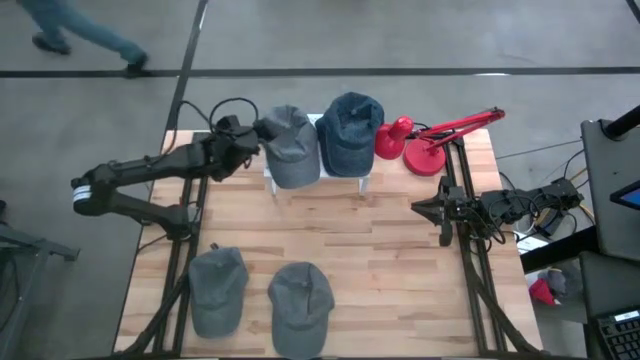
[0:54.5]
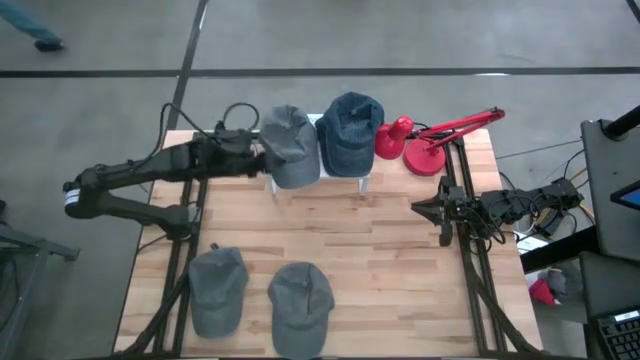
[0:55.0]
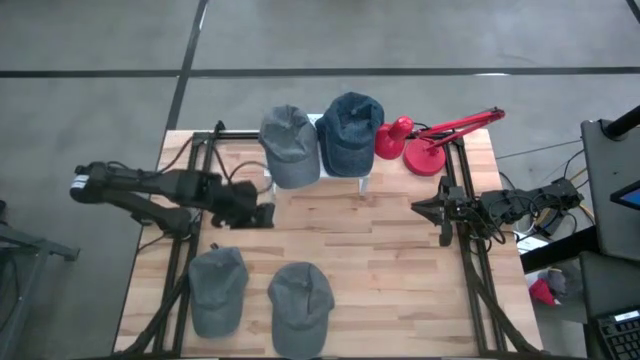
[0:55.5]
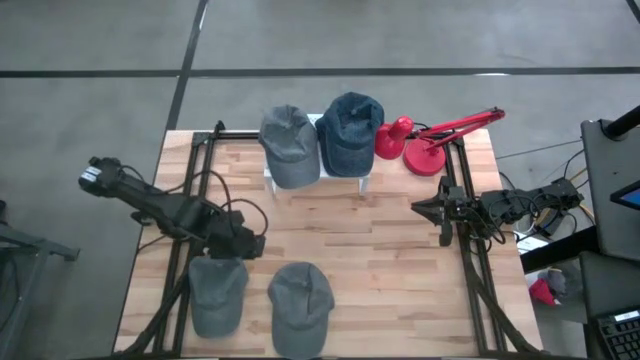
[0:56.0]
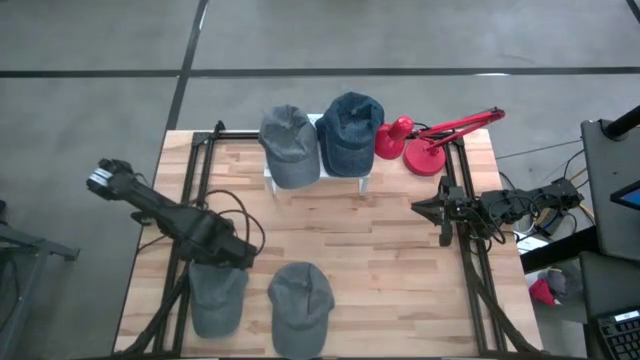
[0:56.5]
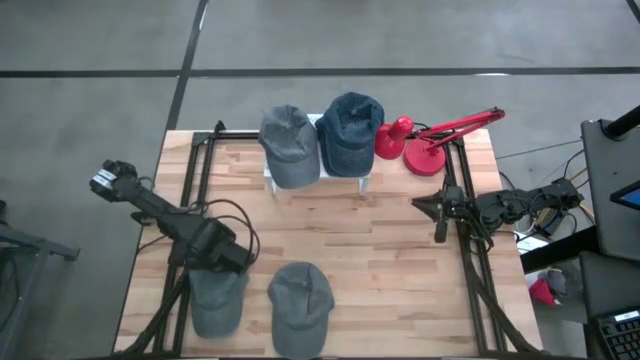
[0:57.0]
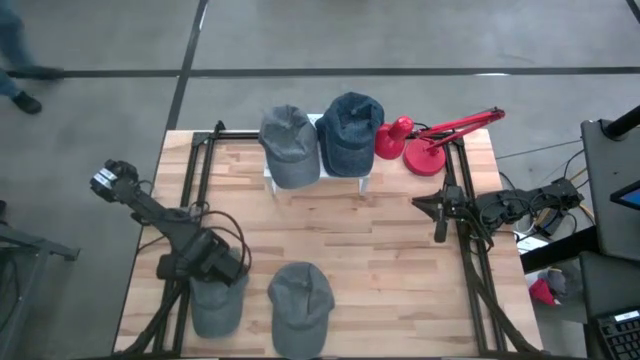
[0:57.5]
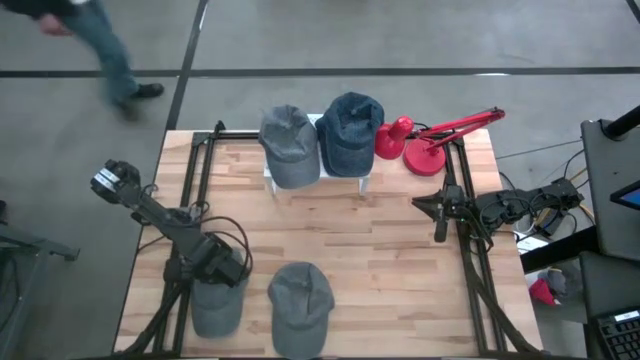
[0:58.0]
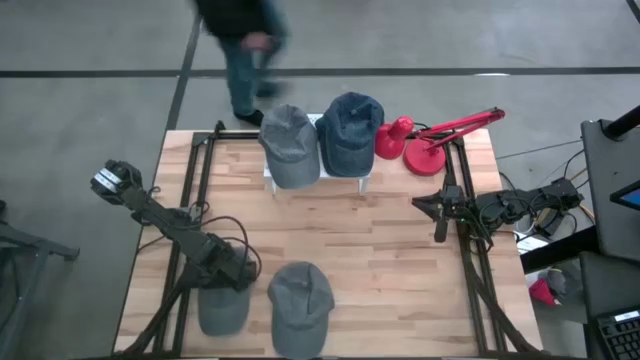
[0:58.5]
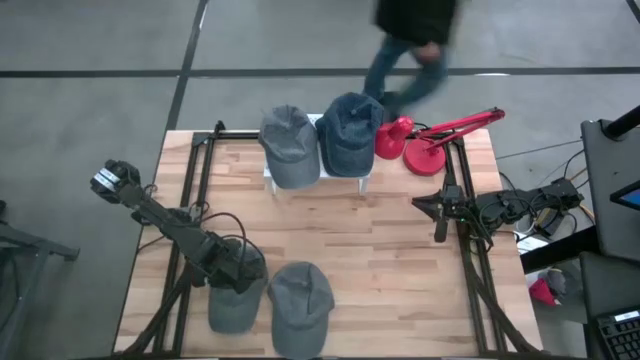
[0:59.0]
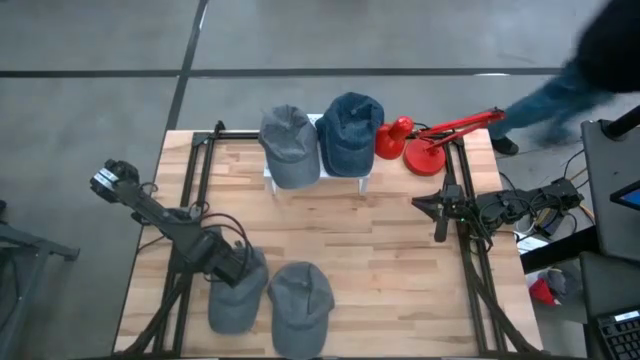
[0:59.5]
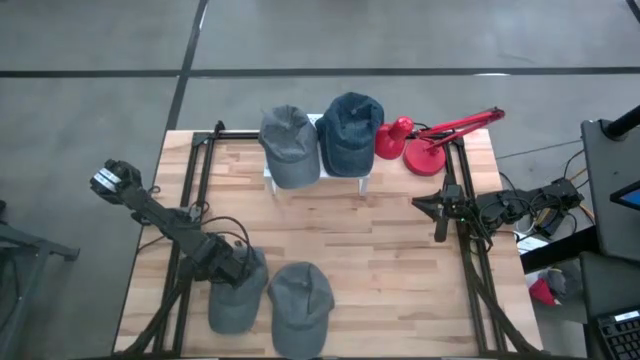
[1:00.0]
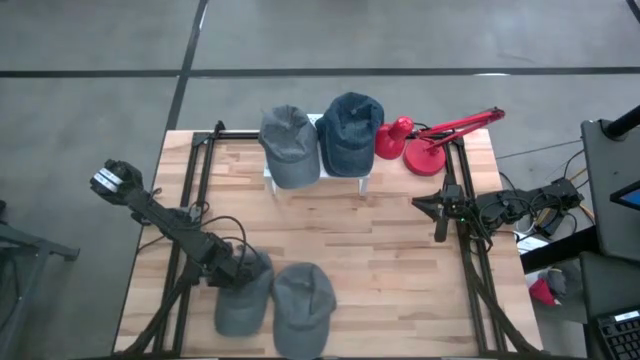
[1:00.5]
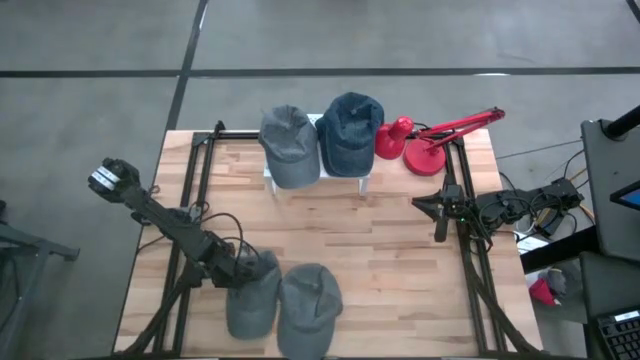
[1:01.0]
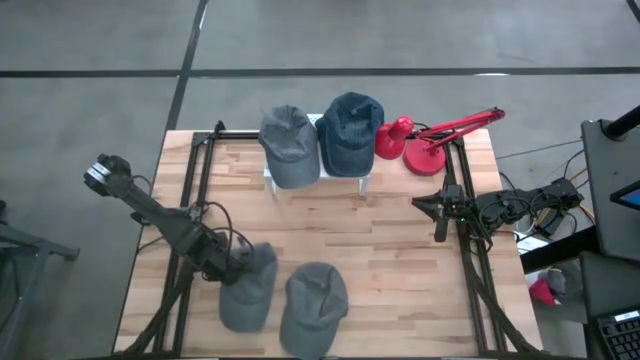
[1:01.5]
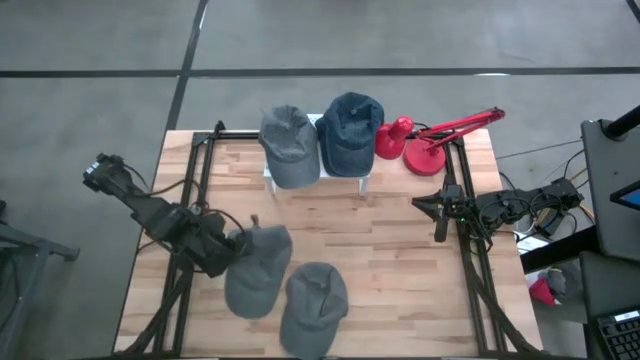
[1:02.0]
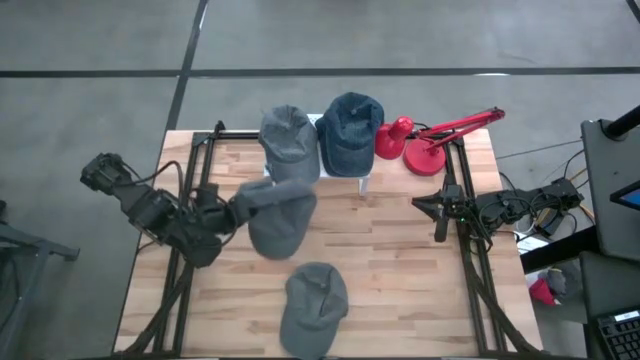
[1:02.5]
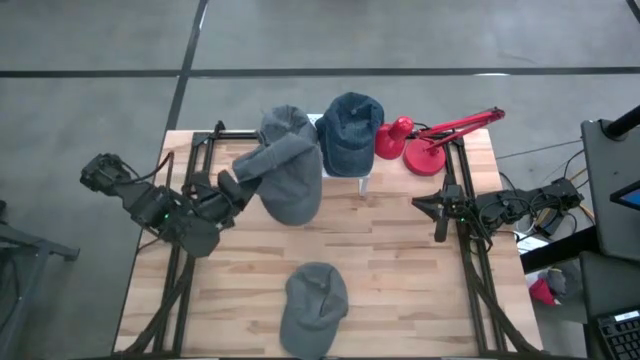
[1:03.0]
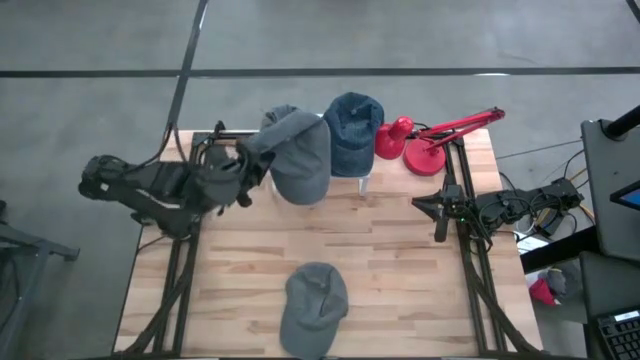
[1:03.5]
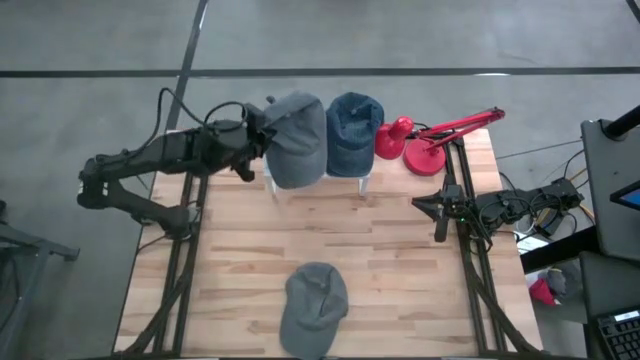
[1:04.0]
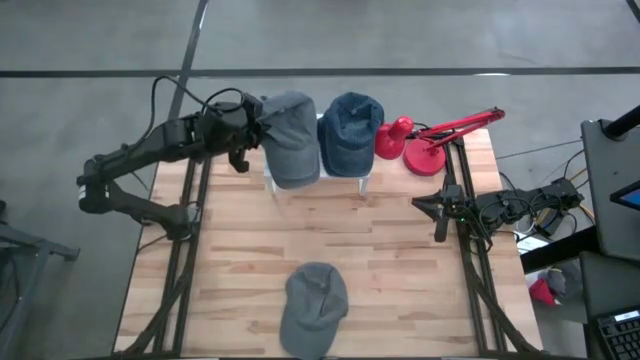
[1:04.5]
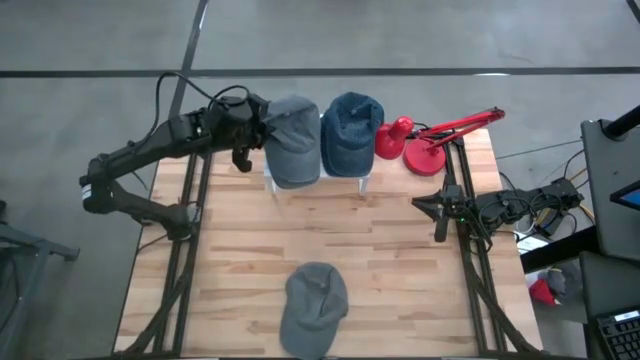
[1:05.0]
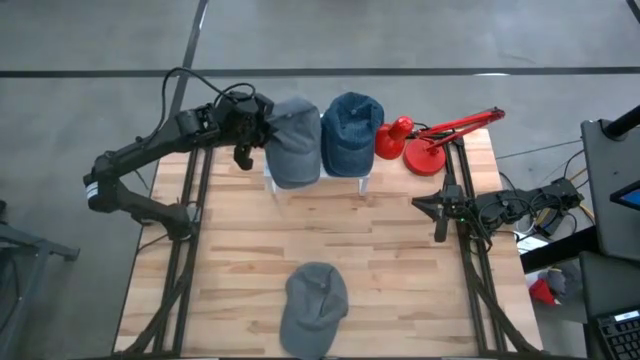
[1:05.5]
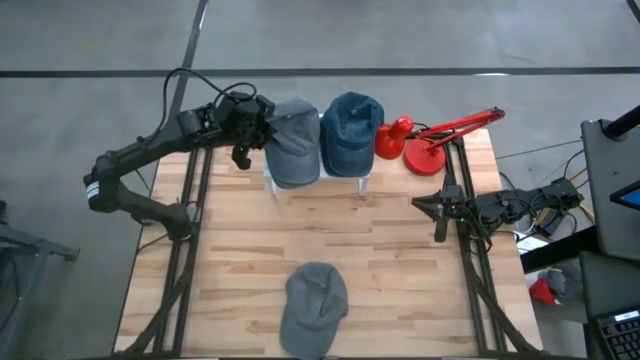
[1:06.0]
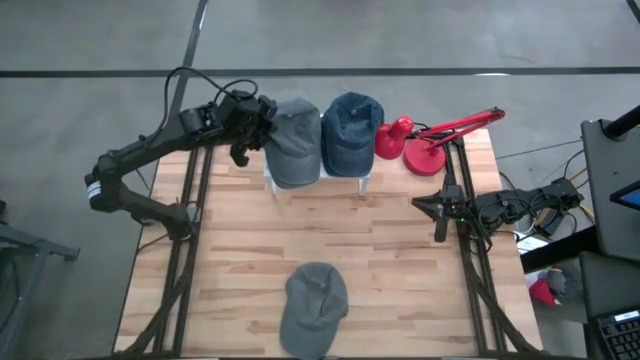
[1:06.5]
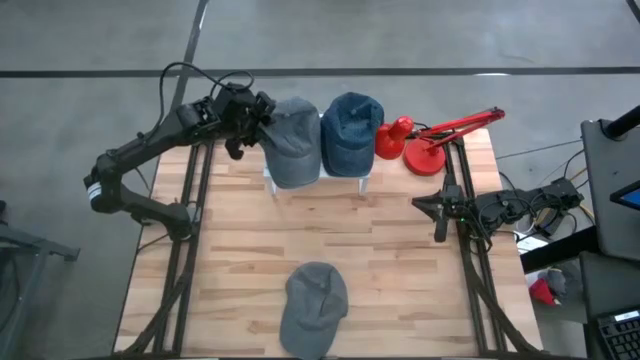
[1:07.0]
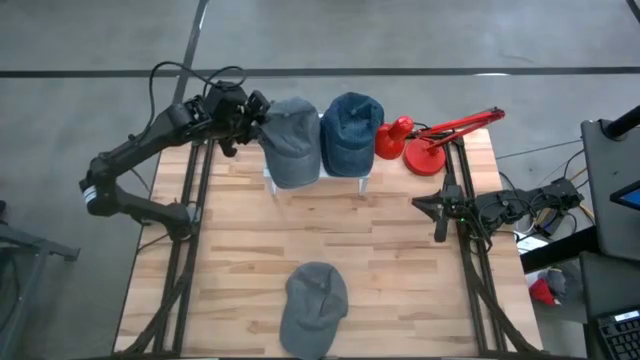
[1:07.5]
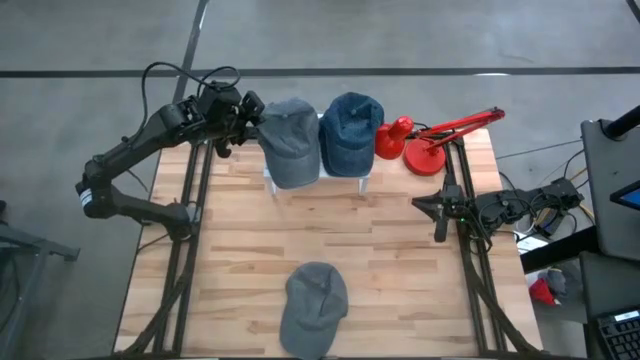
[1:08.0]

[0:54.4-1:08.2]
Task: Pick & Place hat
Stack the left gray cap on the gray cap on the shelf

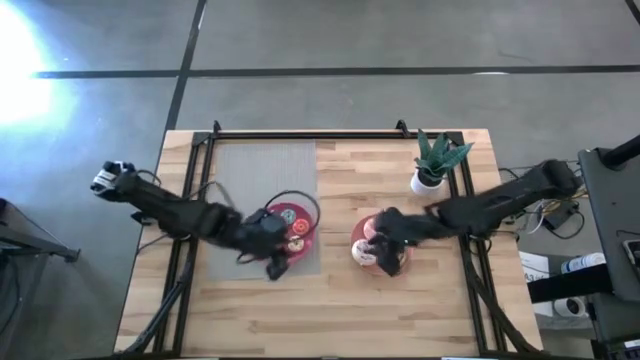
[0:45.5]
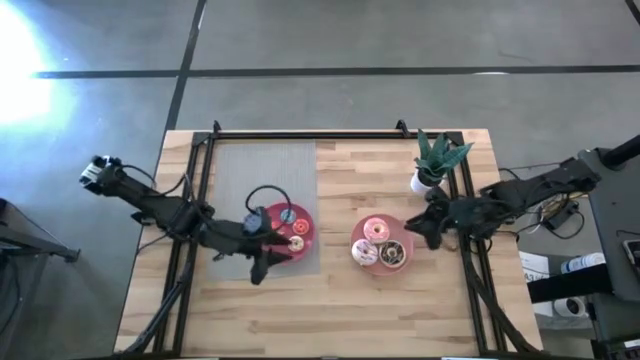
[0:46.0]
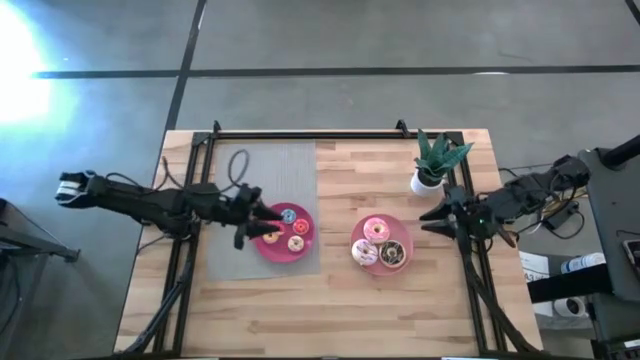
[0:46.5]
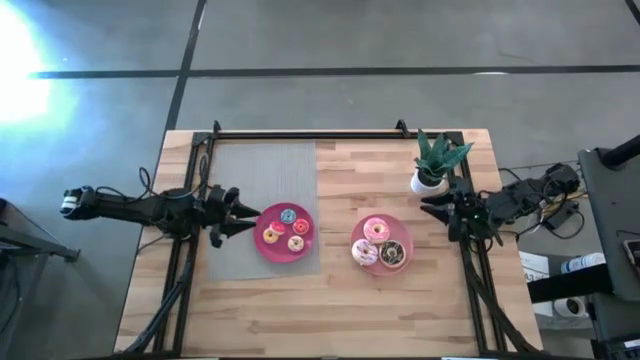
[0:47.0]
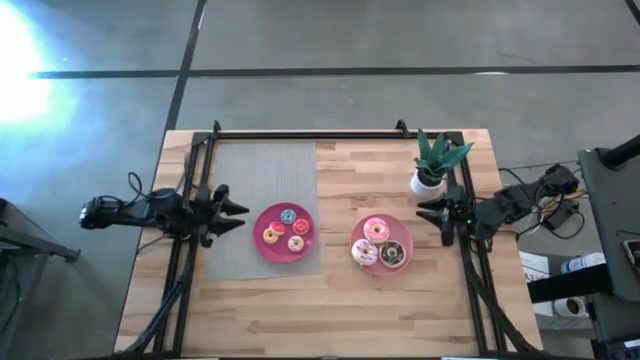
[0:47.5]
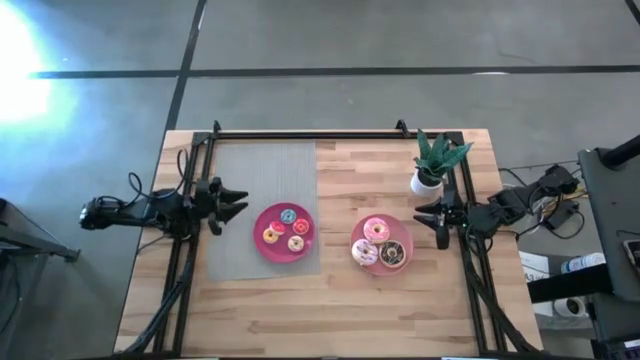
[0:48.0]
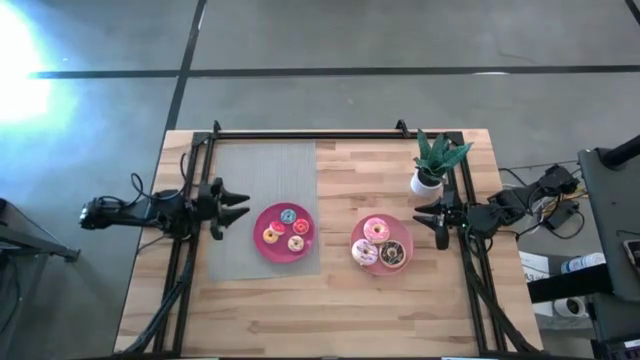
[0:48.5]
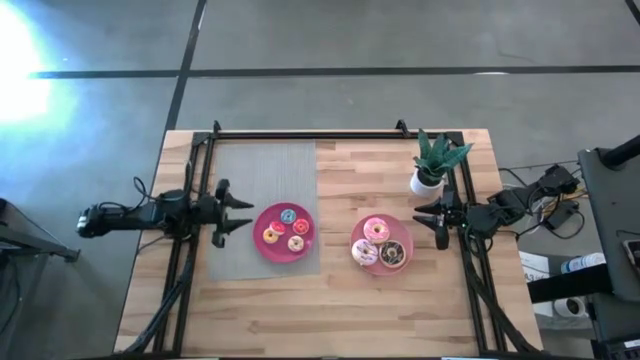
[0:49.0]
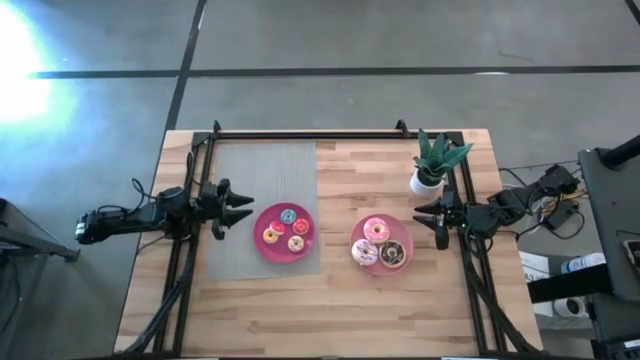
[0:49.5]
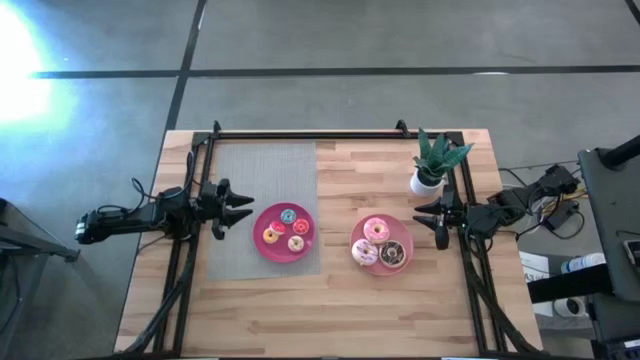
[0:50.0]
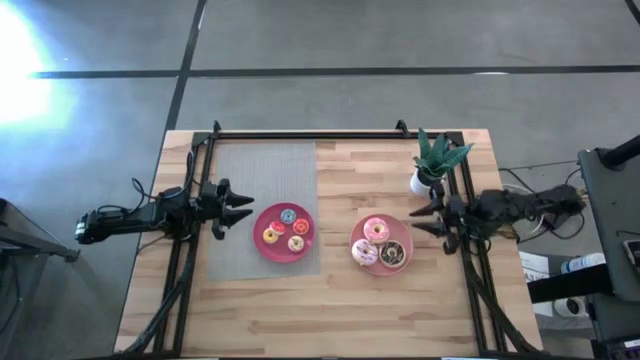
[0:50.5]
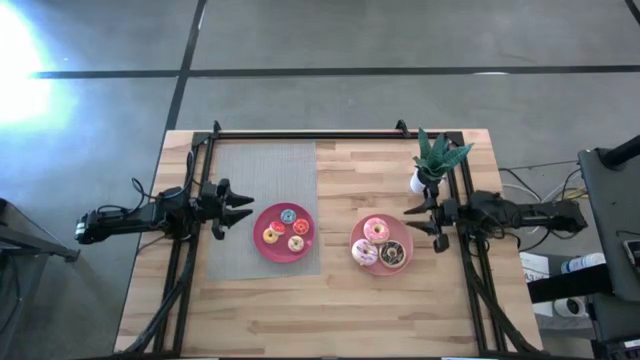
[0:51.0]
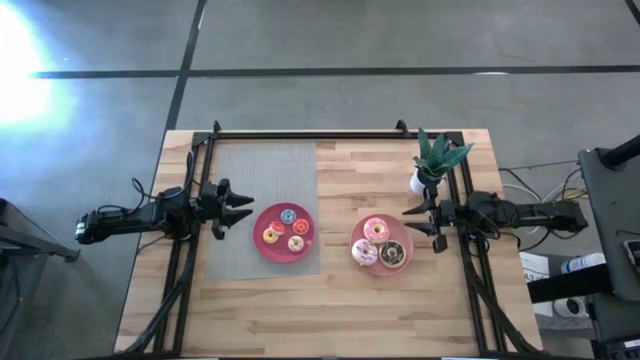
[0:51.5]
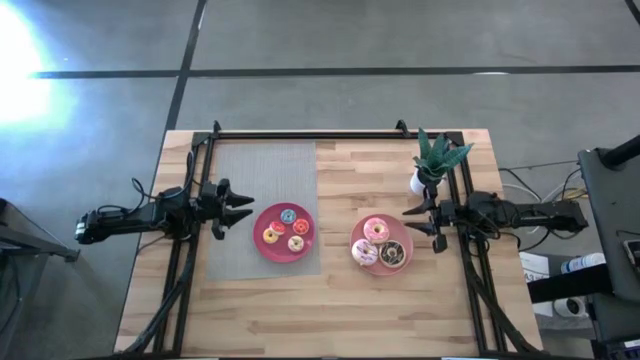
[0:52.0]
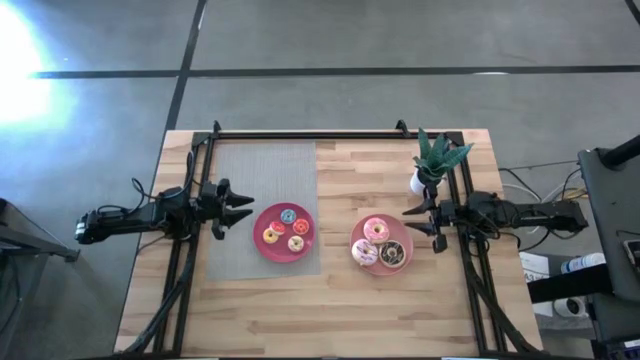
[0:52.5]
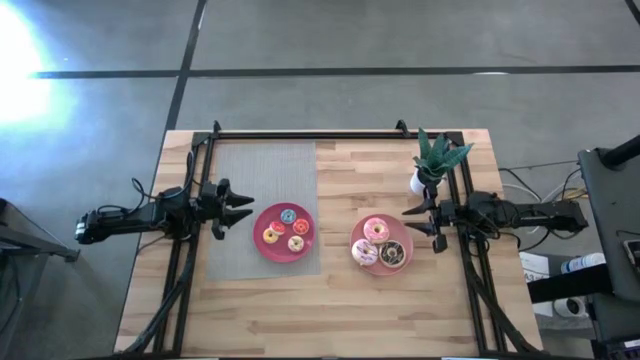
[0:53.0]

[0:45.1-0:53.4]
Task: Pick & Place donuts
Return to Home Position
